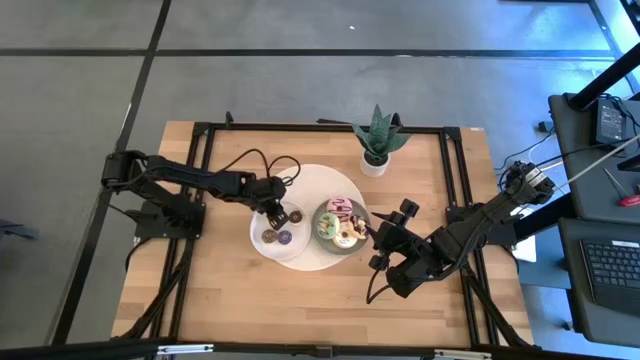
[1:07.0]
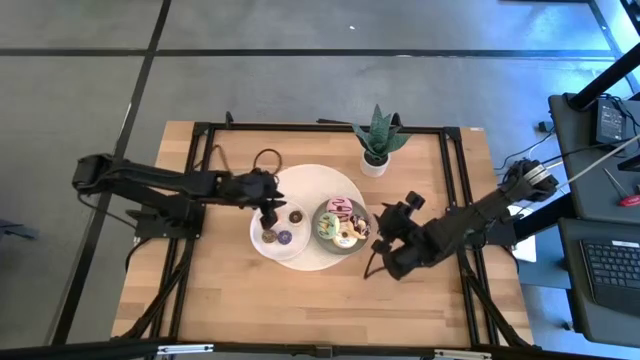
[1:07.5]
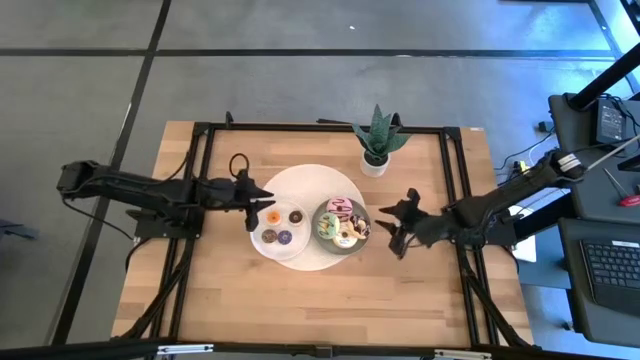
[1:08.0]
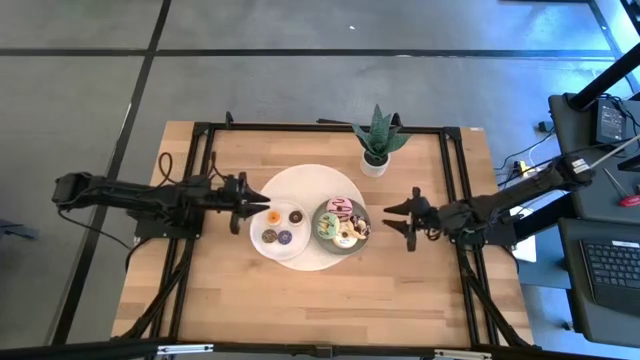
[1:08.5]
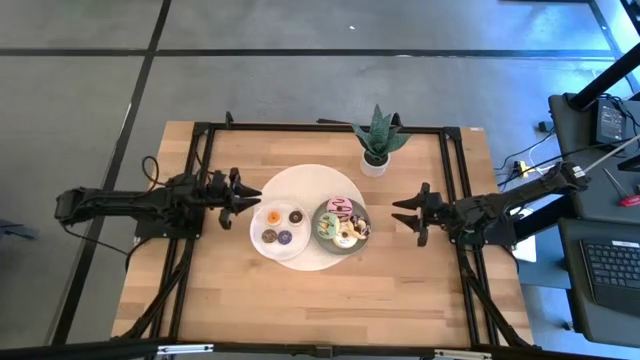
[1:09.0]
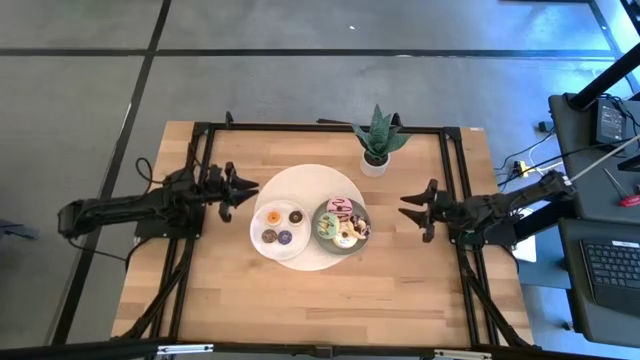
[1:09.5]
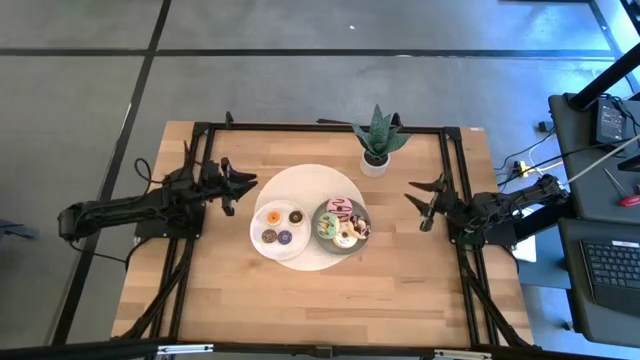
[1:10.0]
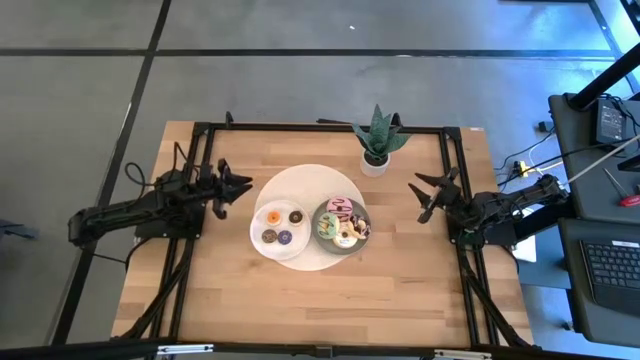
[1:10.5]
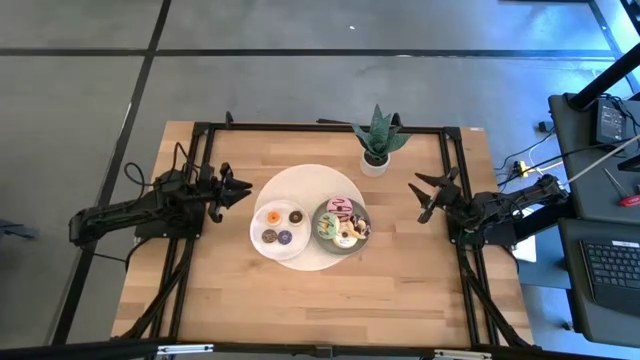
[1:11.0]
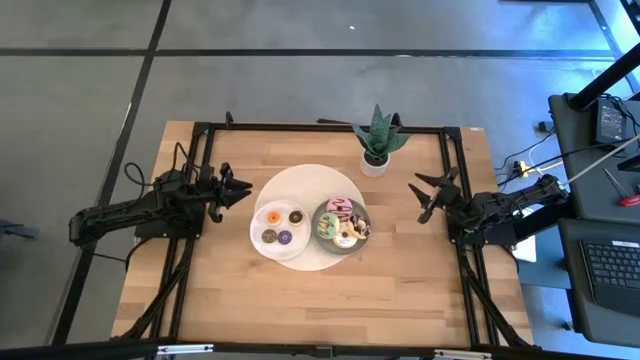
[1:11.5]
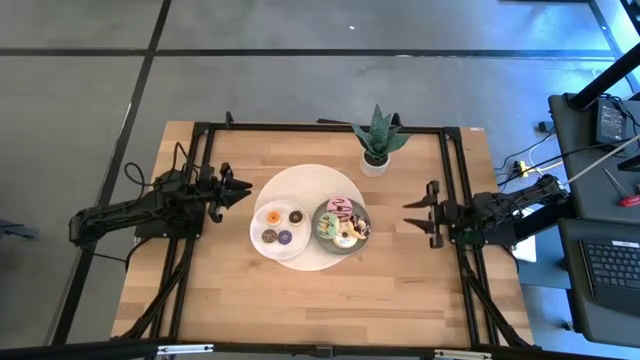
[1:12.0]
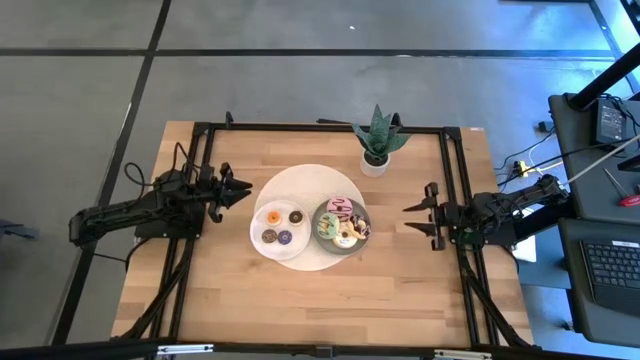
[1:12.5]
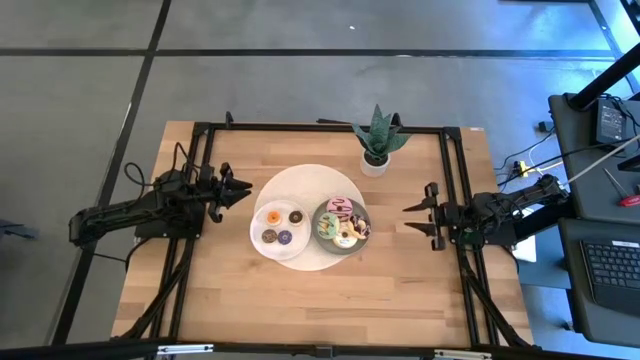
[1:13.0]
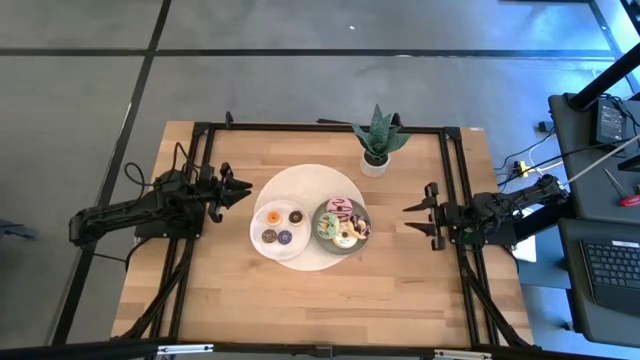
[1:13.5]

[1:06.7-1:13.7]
Task: Pick & Place donuts
Return to Home Position

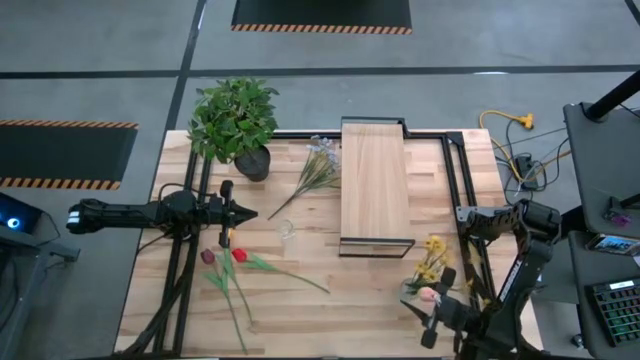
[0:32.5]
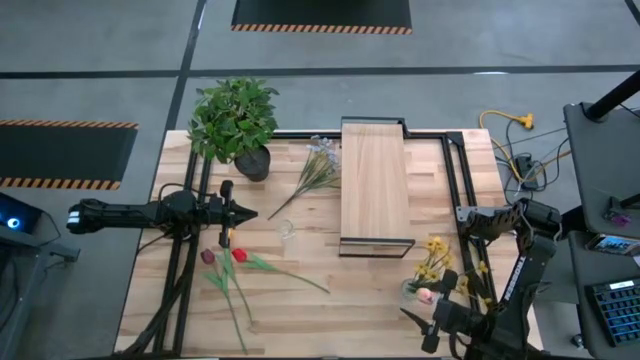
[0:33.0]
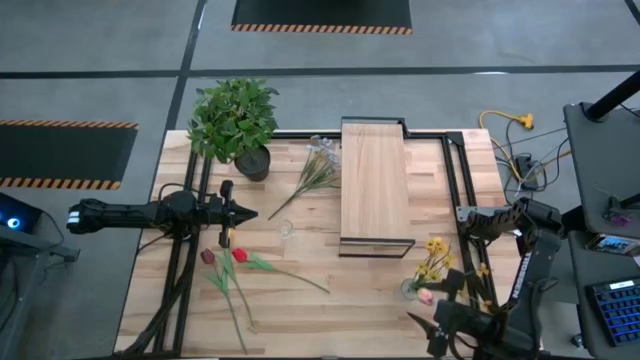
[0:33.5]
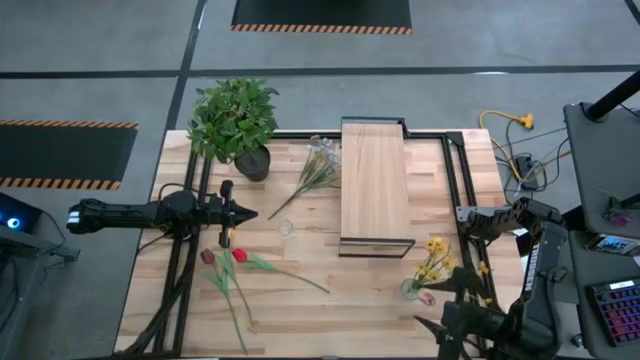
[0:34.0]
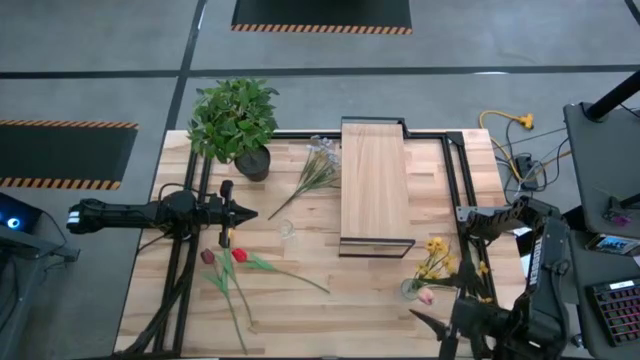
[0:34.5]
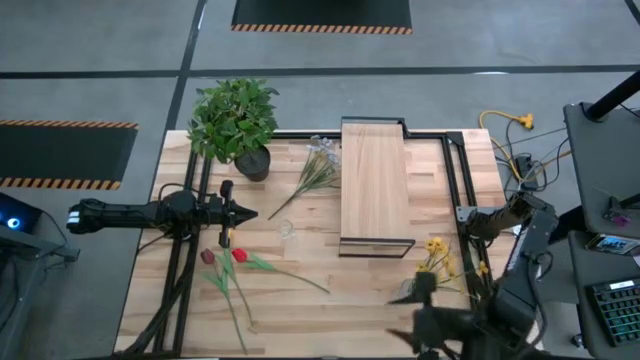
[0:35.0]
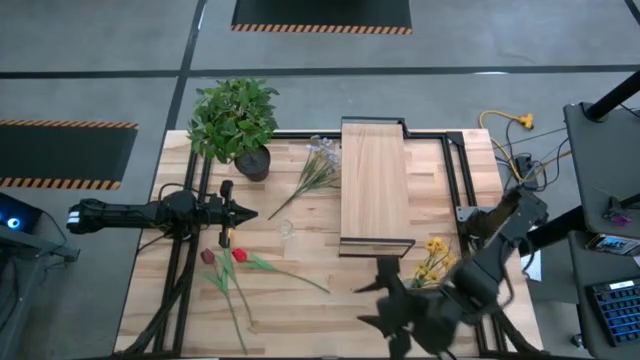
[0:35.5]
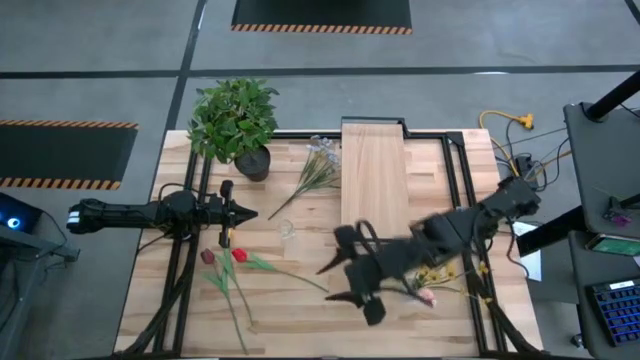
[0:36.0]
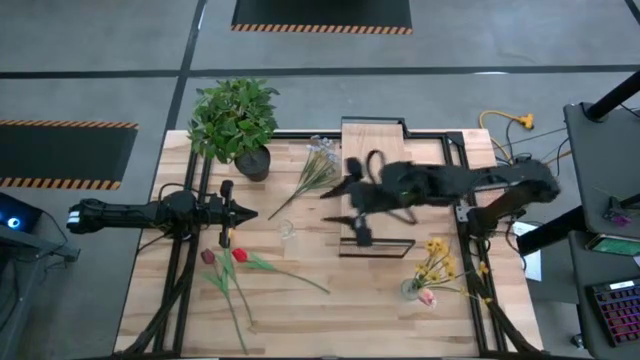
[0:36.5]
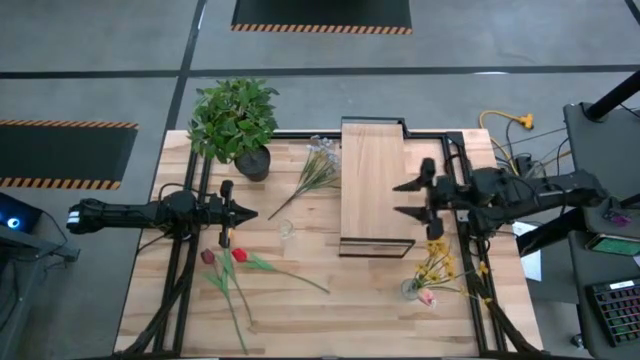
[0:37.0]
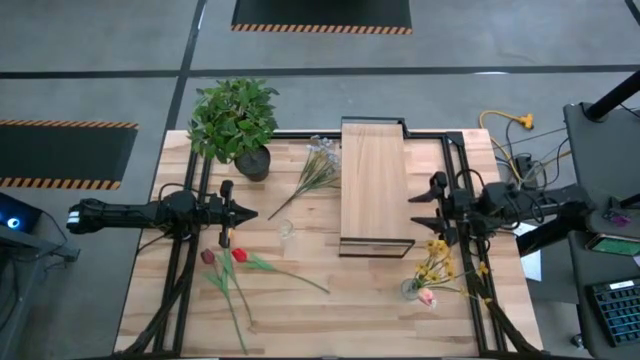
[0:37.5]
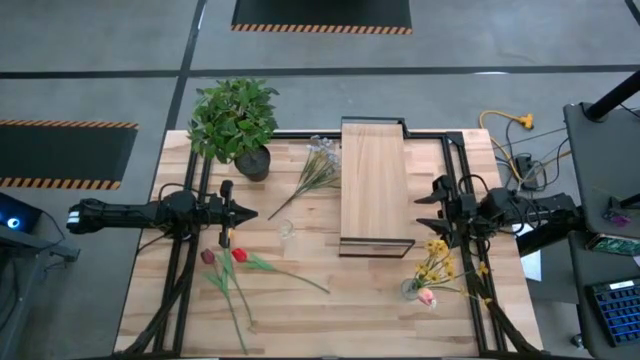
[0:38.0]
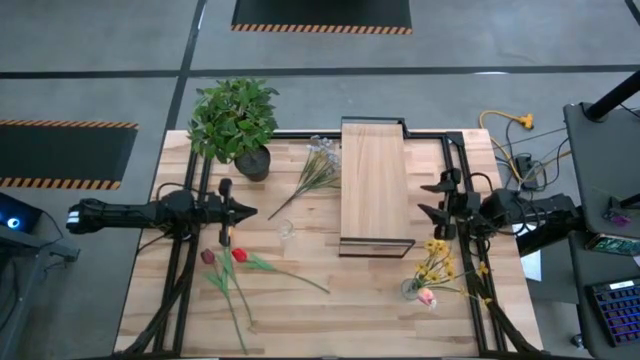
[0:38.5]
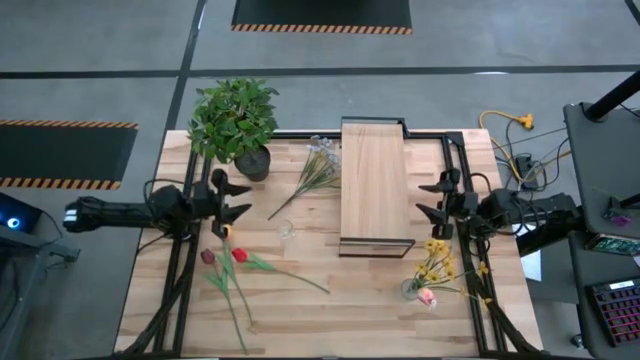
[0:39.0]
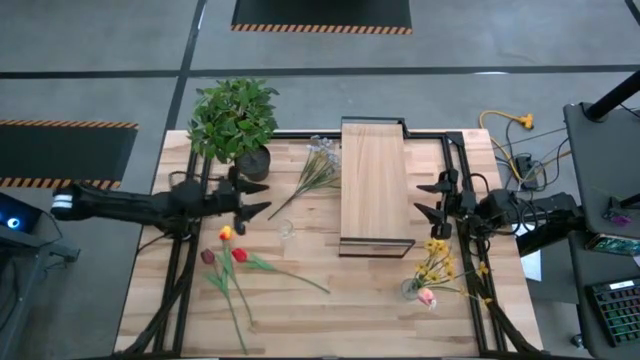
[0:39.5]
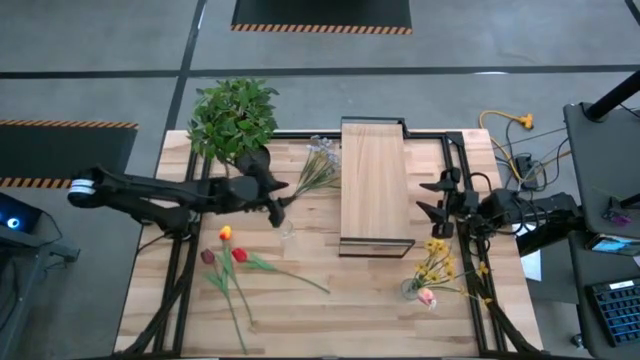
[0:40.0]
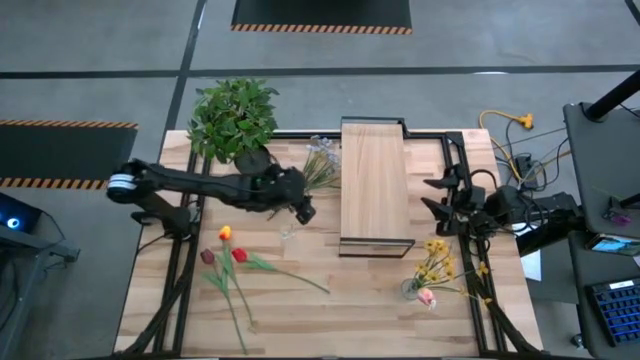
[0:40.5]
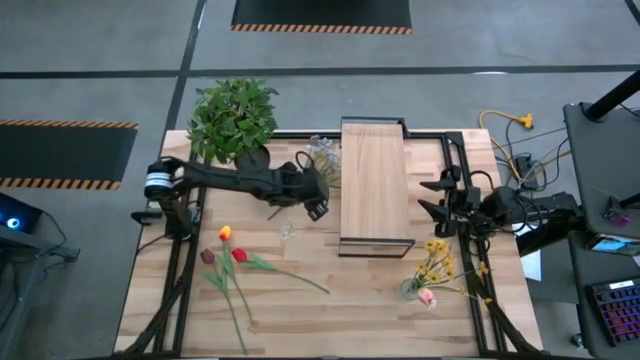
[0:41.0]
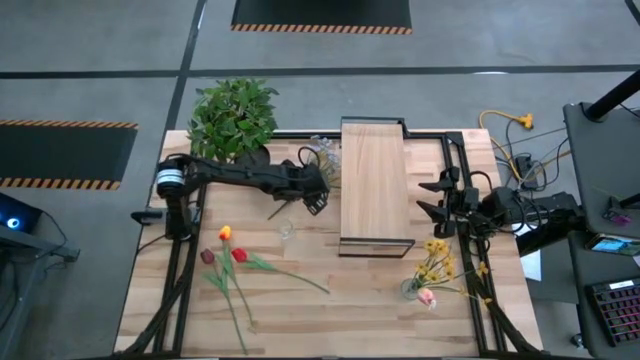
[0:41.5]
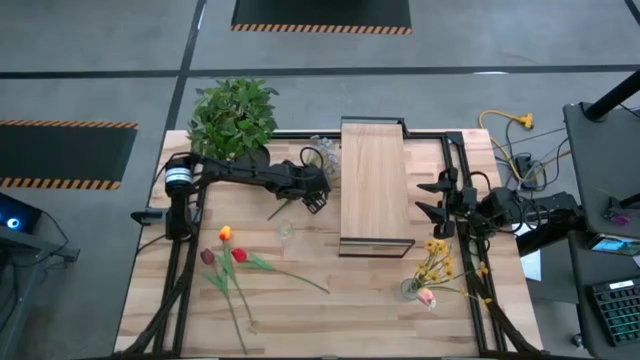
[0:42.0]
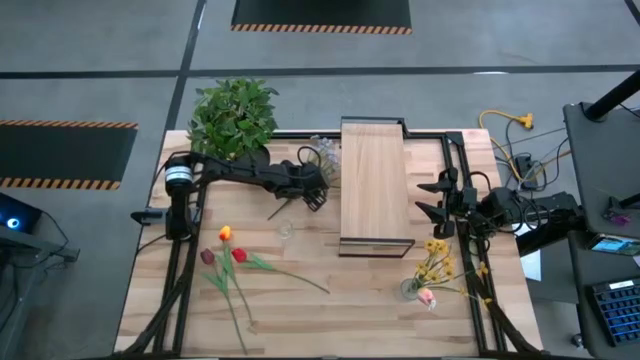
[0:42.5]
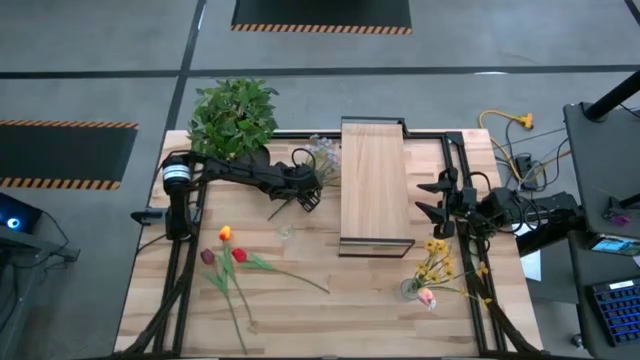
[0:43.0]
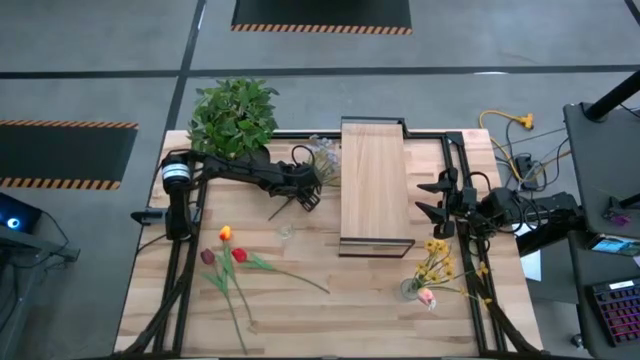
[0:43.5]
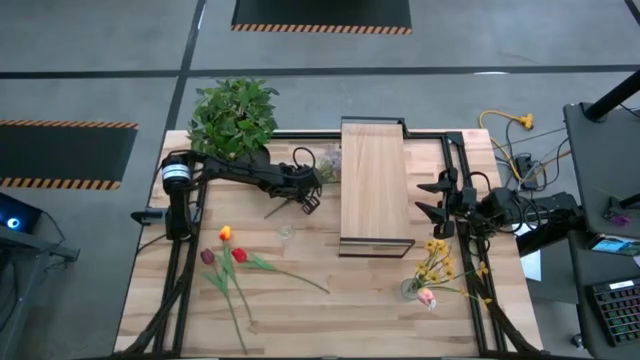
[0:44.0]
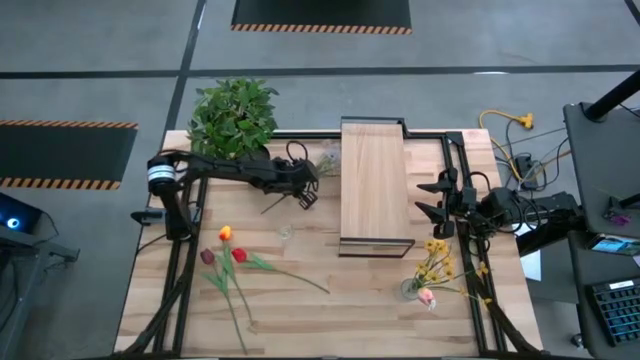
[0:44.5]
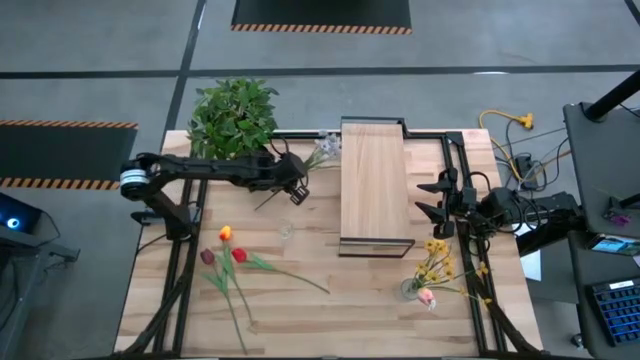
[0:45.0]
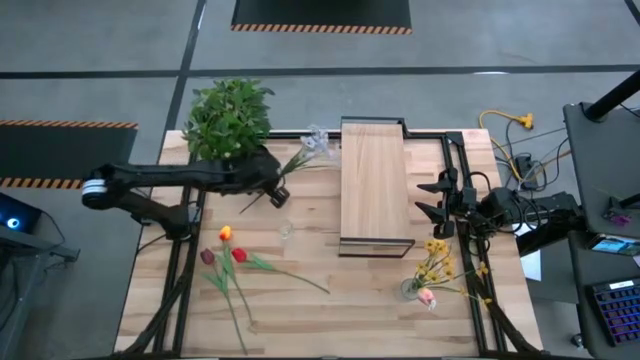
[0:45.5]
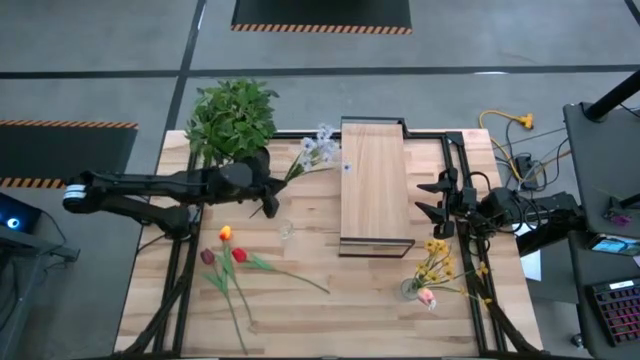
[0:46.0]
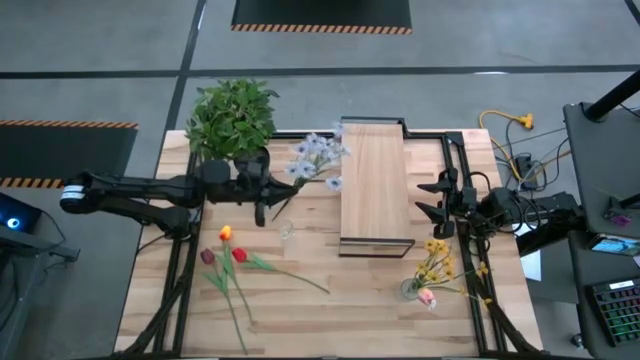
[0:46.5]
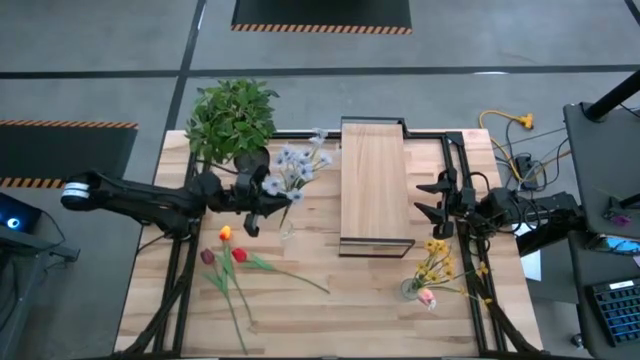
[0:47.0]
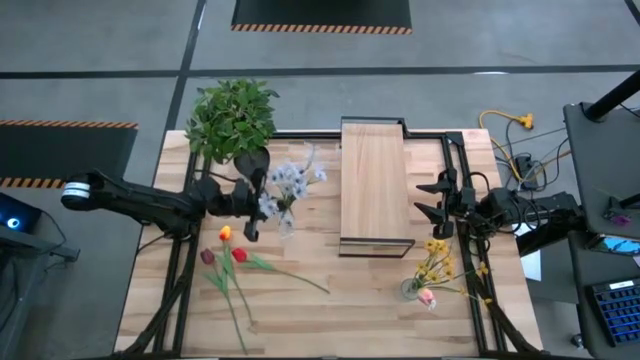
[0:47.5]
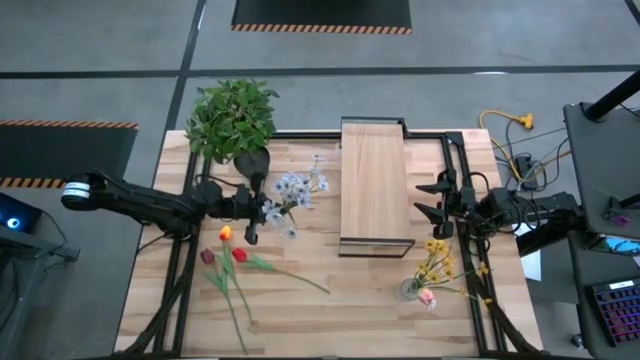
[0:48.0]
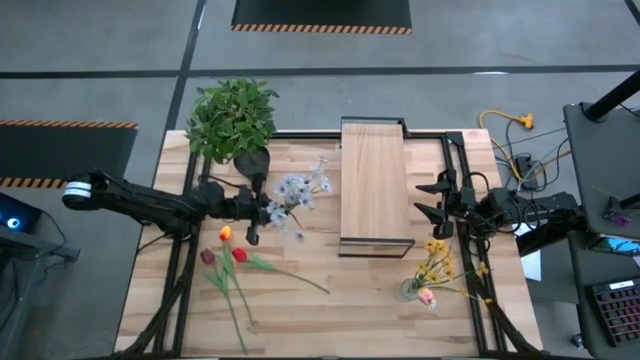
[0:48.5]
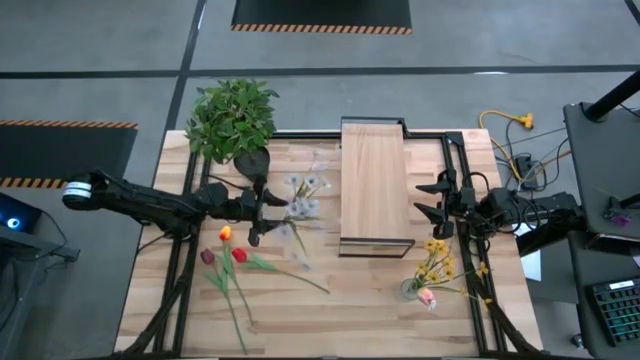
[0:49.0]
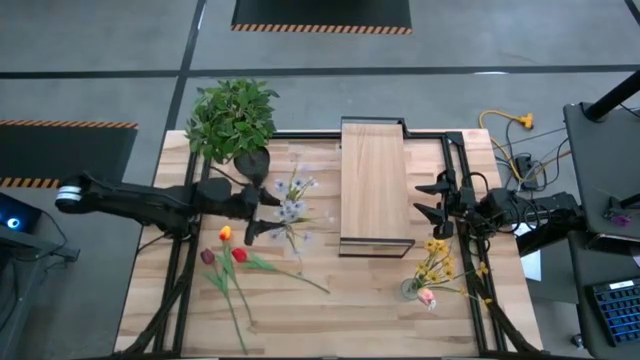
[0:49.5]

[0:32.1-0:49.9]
Task: Pick and place flowers into a vace then onto a shelf
Put the white flower into the left transparent glass vase
